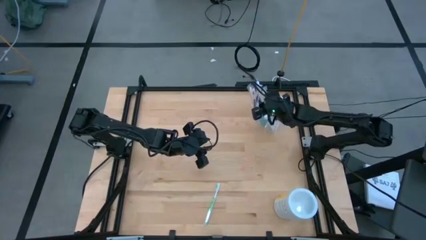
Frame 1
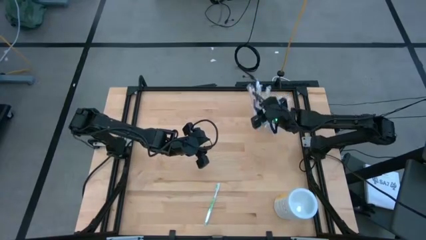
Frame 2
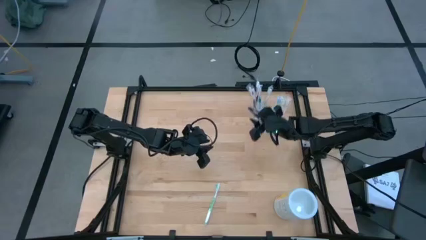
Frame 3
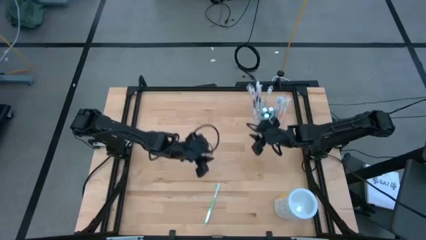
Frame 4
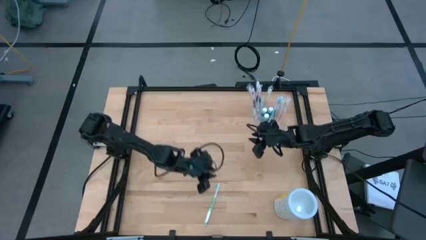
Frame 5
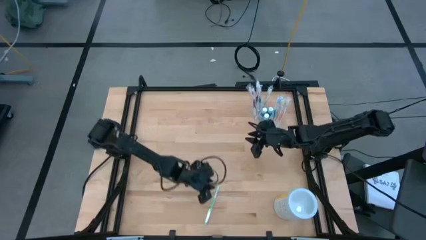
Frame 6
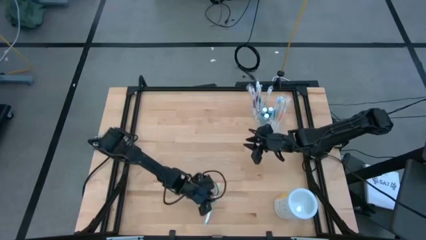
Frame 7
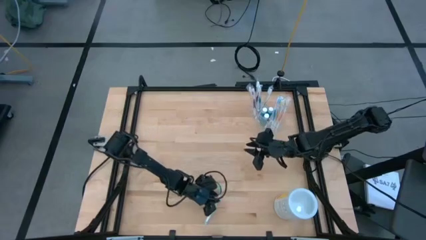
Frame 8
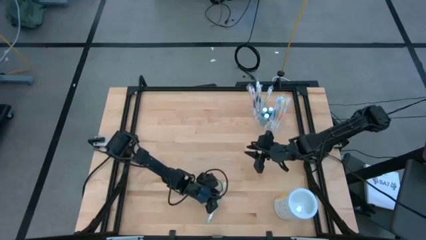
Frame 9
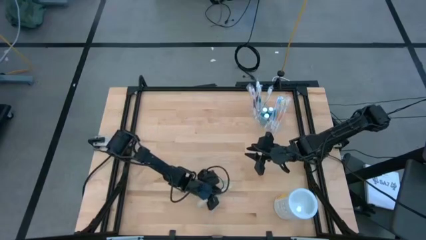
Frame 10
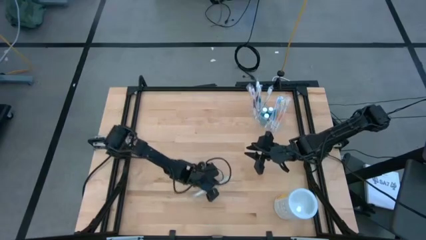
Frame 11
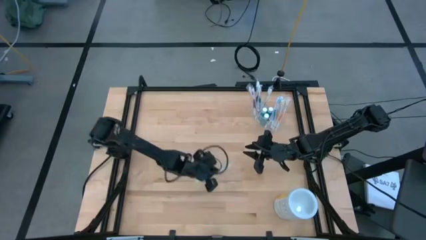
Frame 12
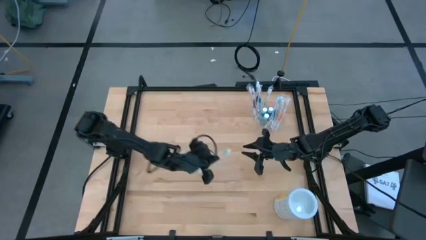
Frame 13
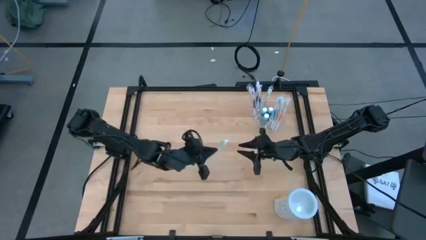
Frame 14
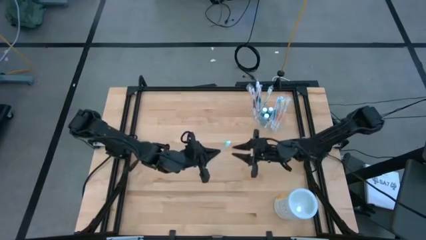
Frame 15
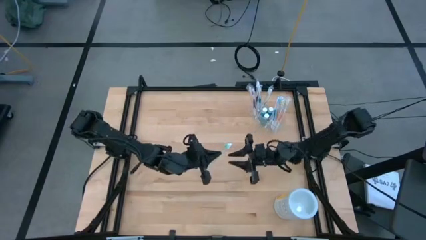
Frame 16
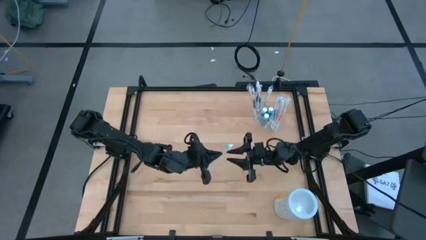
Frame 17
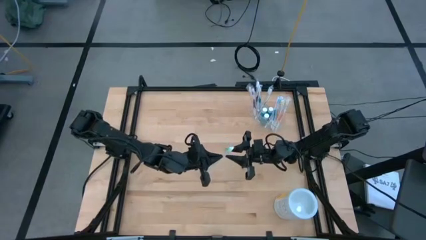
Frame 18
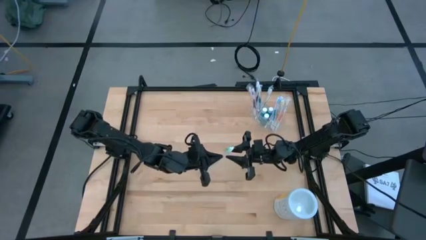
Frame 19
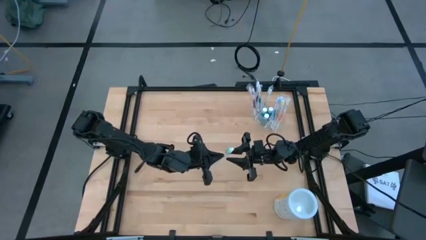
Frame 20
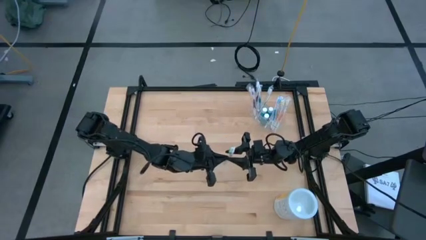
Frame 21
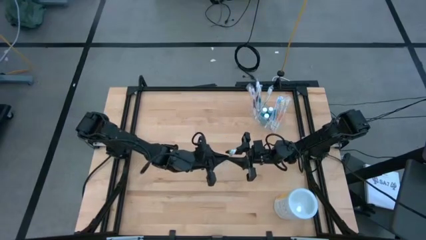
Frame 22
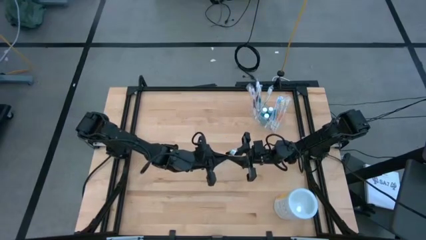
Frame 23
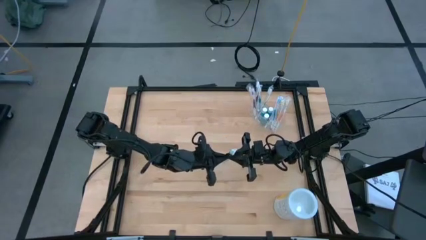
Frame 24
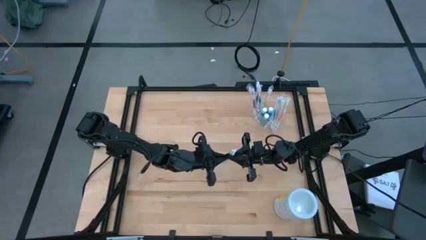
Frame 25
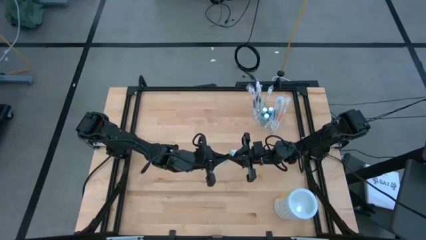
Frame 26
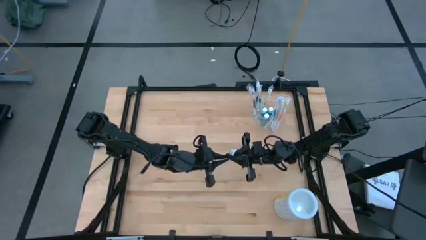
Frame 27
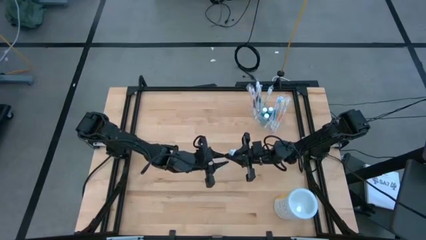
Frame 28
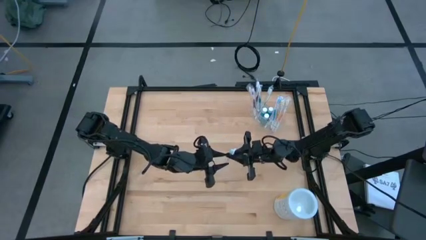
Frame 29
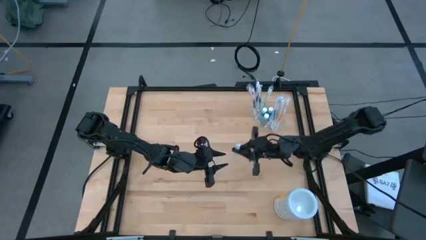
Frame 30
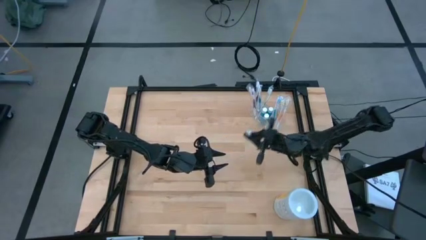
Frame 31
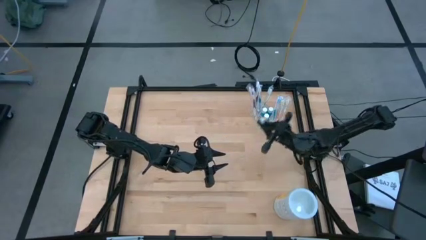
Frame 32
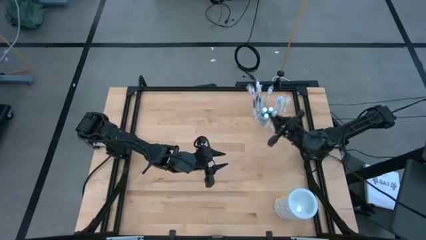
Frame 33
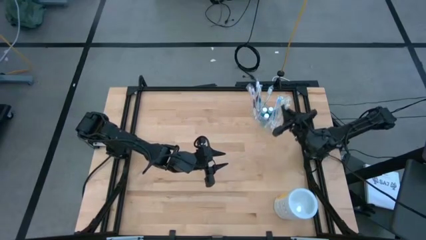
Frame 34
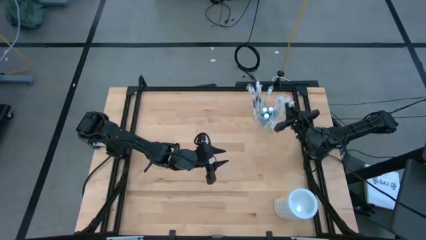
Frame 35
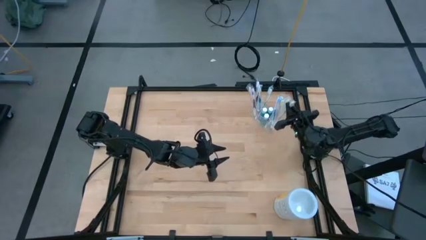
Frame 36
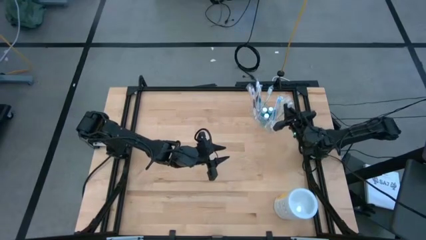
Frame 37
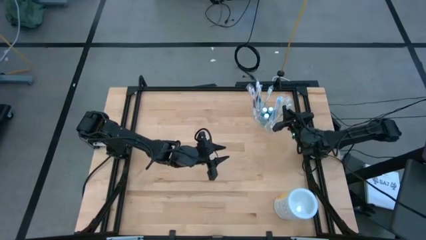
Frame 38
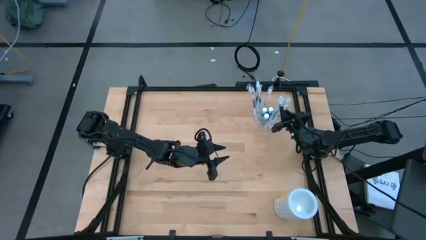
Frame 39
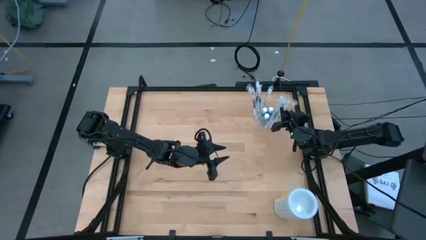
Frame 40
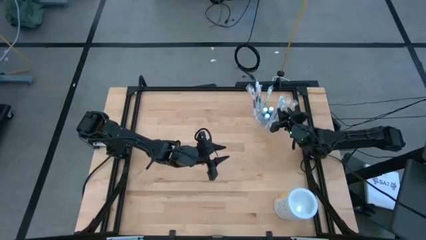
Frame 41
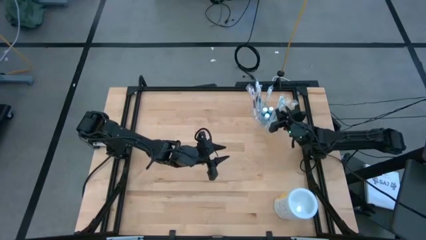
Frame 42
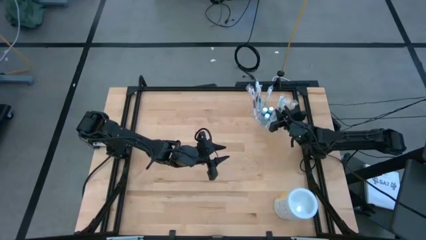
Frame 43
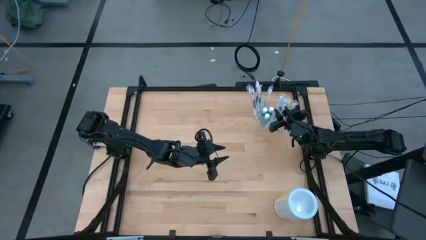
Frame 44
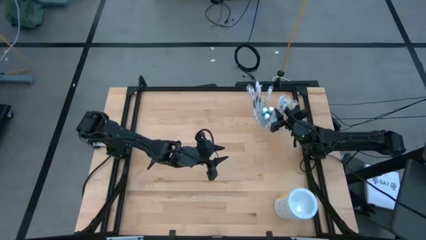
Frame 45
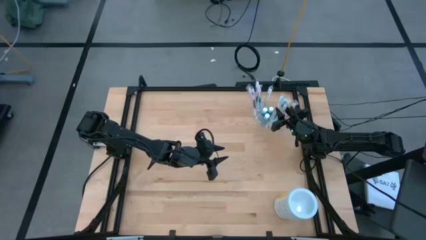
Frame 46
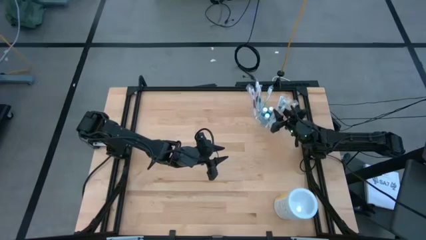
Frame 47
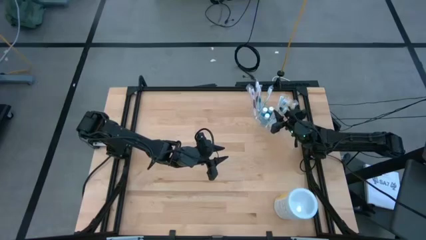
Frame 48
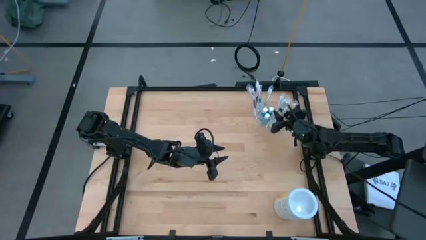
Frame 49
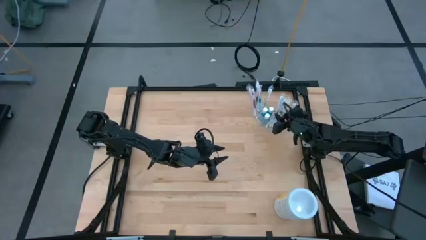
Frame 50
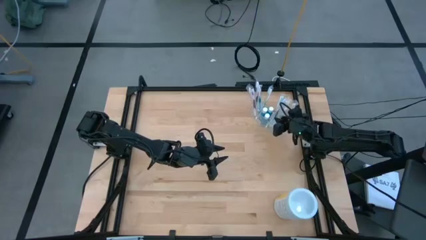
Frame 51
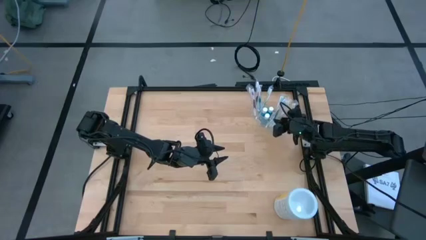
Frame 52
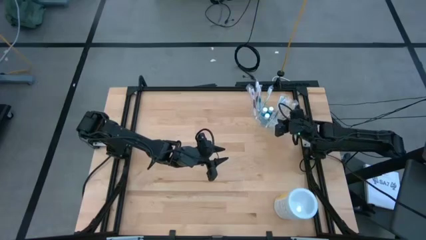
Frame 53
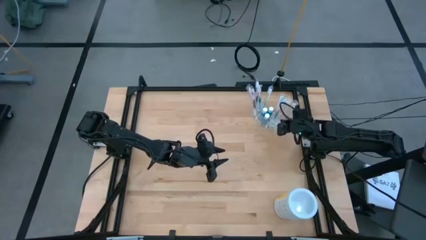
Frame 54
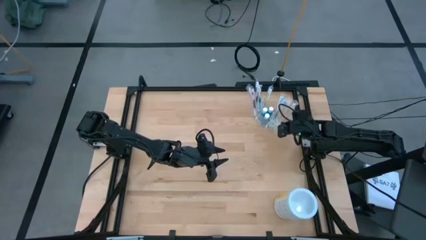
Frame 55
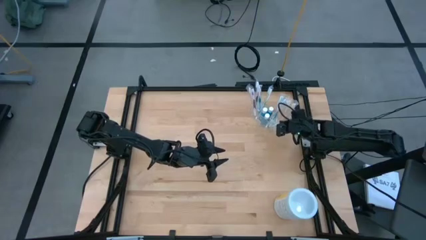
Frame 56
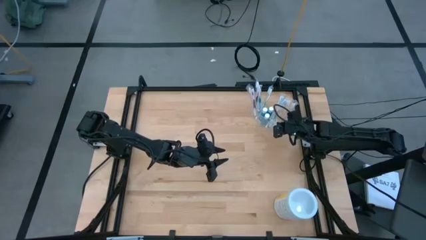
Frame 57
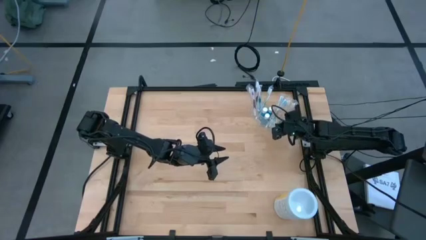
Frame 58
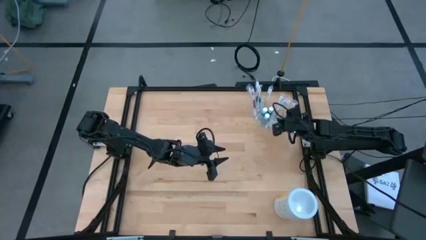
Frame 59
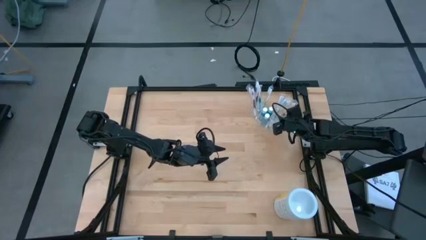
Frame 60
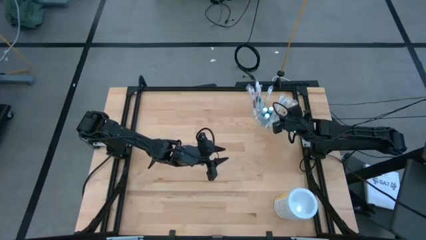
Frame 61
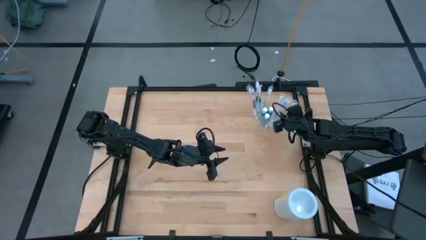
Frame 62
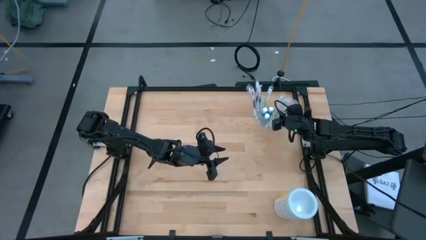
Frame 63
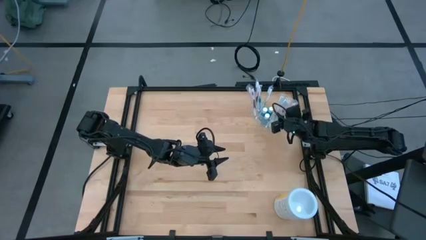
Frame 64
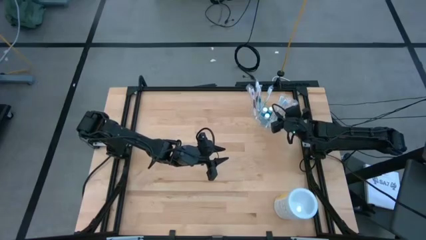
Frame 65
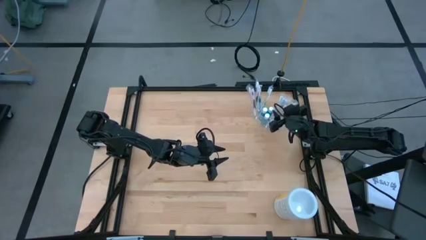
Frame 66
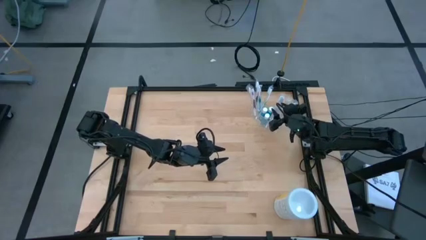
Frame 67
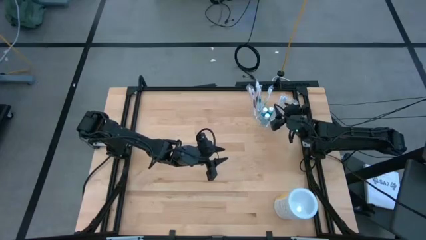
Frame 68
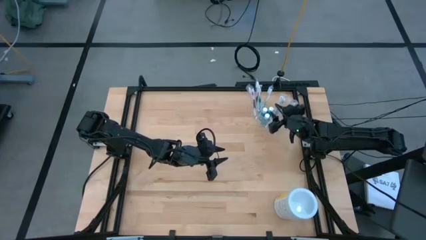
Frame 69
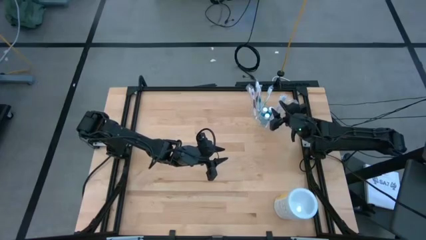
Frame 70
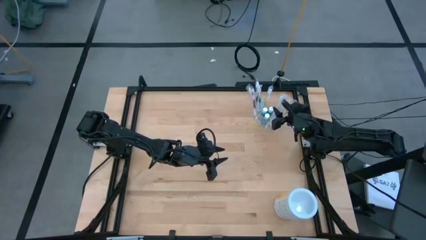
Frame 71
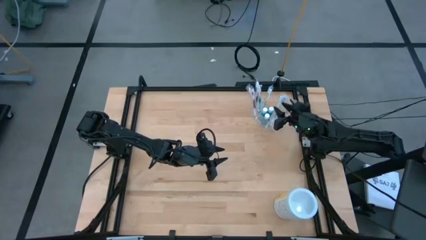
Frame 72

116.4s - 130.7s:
Task: Pick & Place toothbrushing station
Put the green toothbrush into the transparent organizer

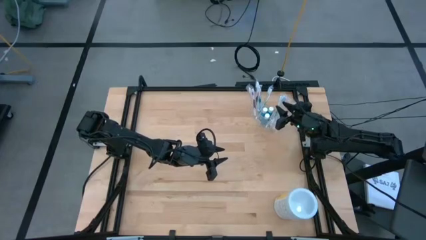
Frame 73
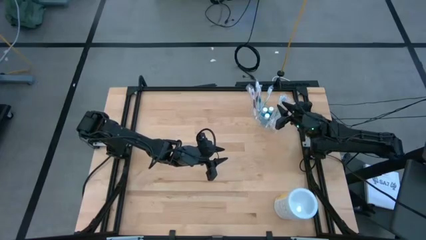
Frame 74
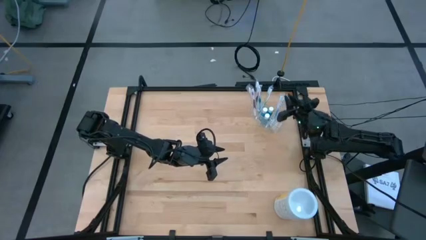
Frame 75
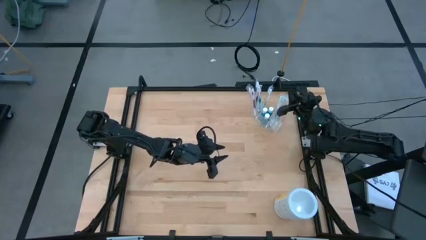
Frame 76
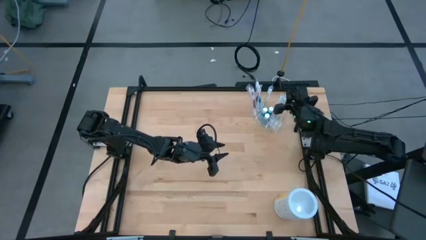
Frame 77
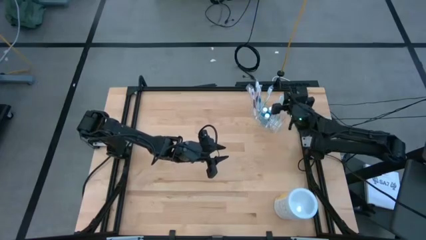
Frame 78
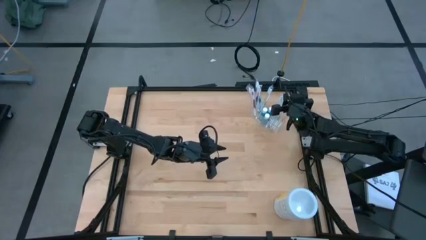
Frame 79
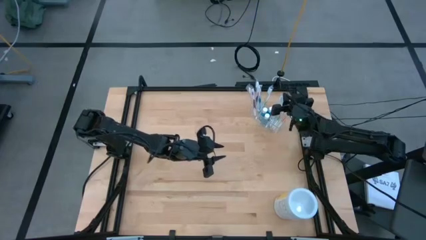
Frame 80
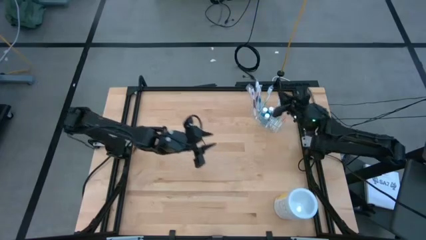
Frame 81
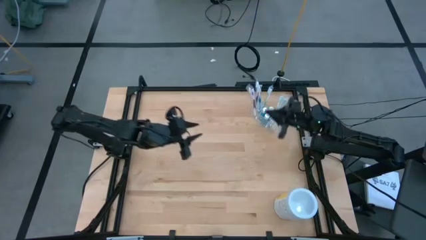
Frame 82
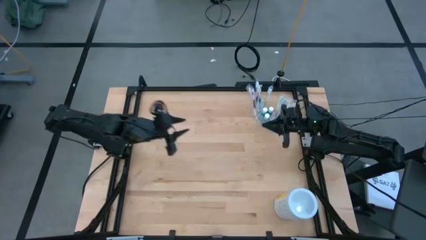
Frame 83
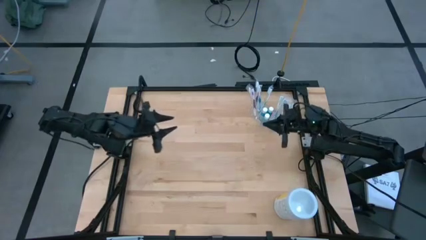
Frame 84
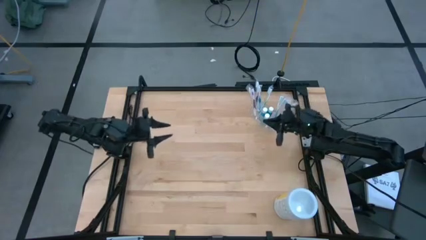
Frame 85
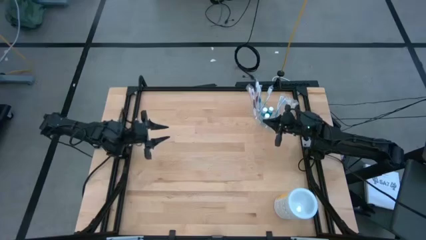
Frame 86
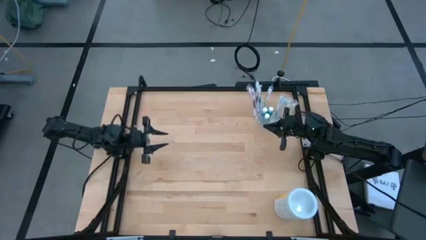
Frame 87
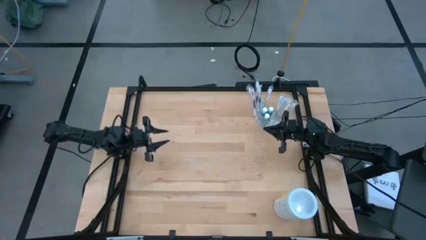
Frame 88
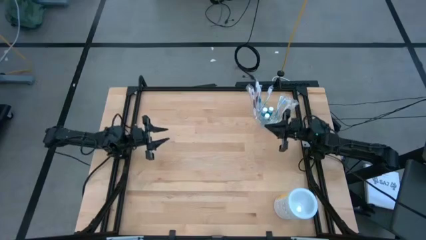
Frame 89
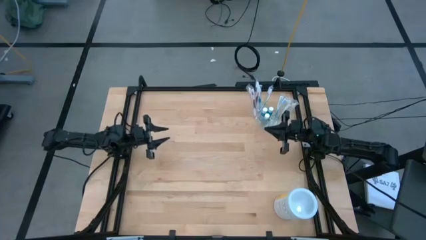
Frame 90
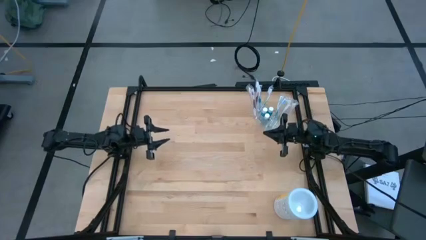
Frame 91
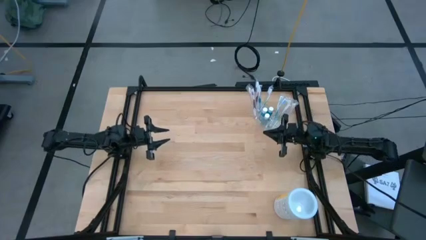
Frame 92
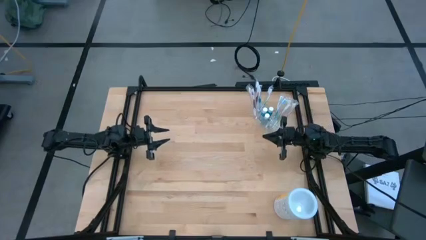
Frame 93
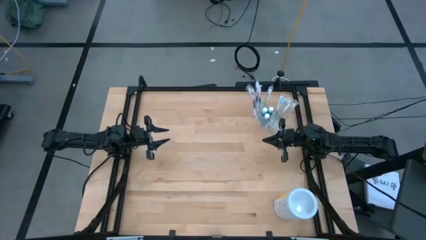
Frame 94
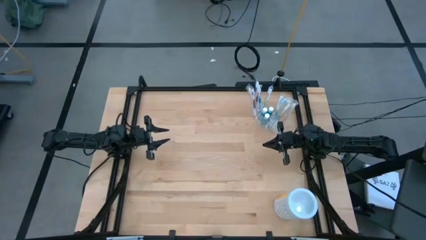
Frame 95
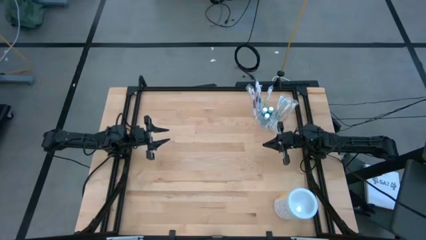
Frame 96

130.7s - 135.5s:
Return to Home Position
